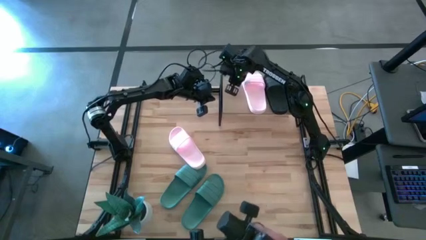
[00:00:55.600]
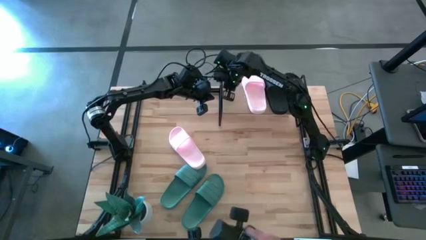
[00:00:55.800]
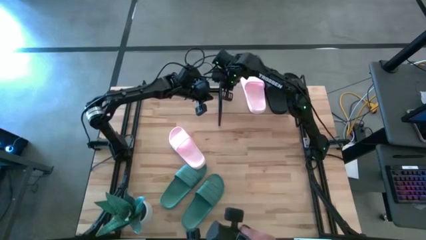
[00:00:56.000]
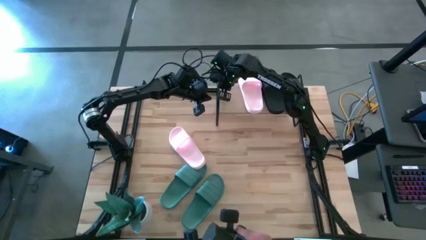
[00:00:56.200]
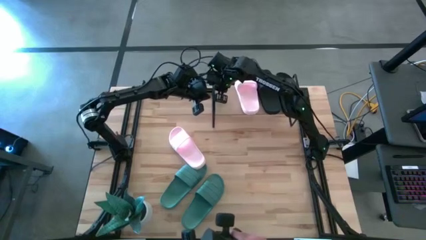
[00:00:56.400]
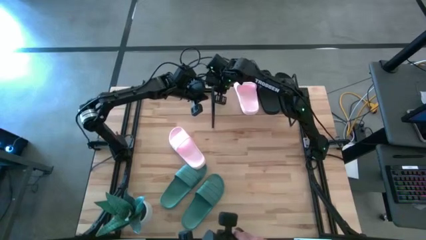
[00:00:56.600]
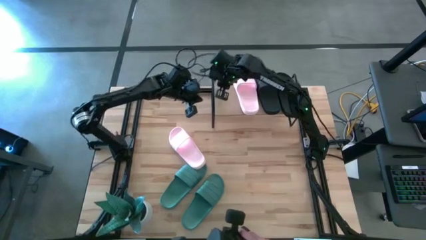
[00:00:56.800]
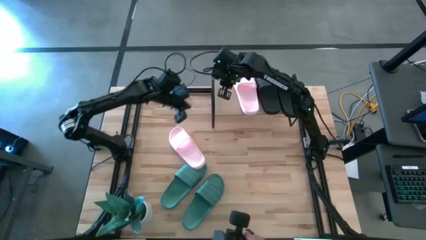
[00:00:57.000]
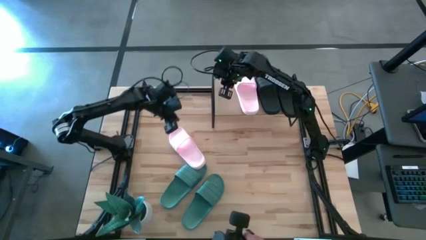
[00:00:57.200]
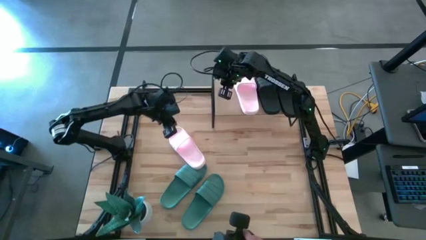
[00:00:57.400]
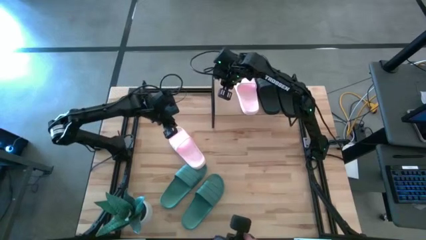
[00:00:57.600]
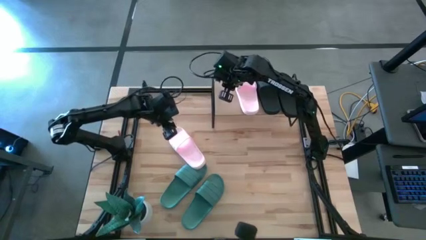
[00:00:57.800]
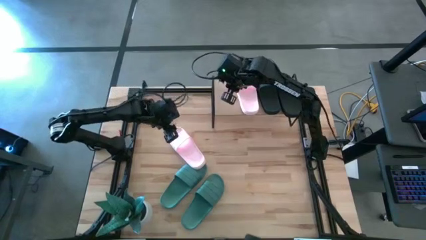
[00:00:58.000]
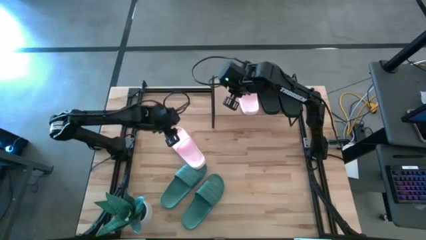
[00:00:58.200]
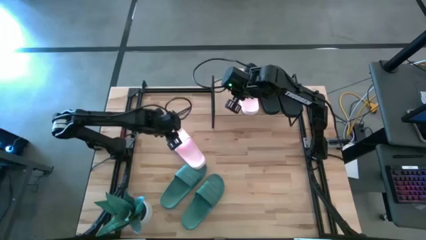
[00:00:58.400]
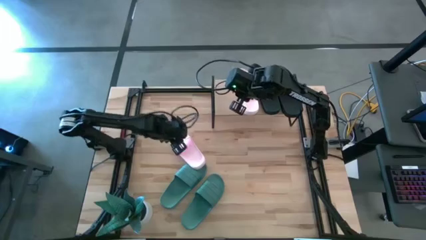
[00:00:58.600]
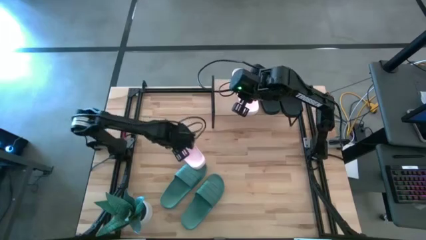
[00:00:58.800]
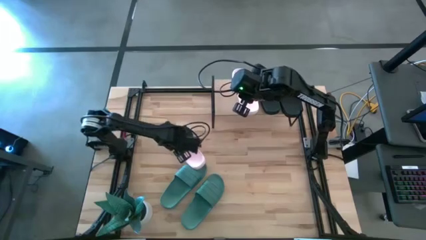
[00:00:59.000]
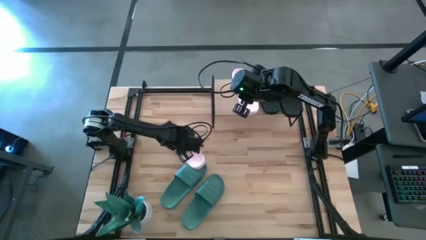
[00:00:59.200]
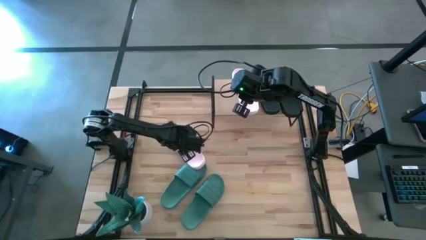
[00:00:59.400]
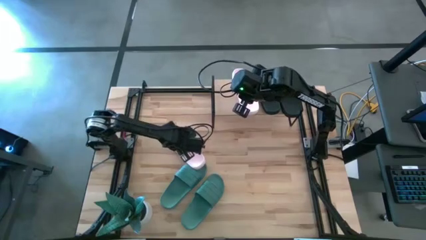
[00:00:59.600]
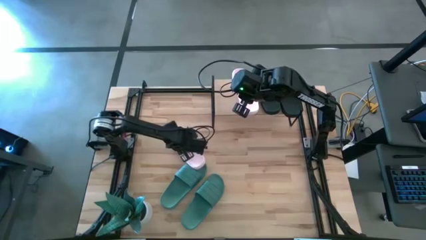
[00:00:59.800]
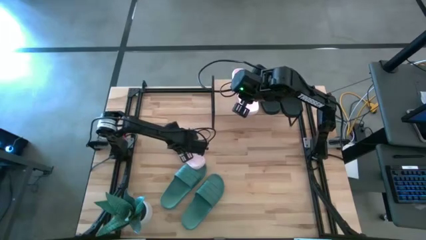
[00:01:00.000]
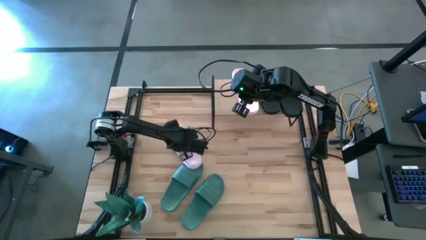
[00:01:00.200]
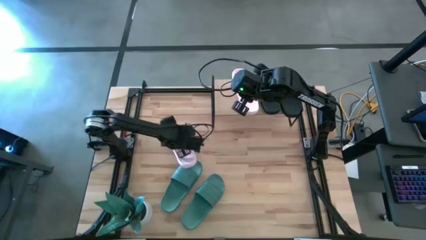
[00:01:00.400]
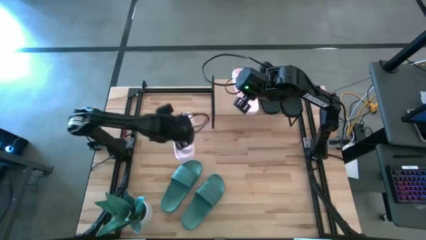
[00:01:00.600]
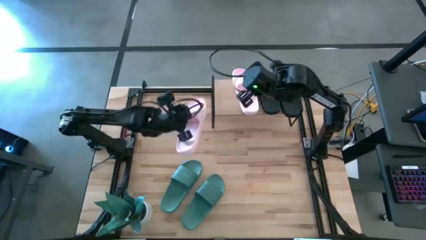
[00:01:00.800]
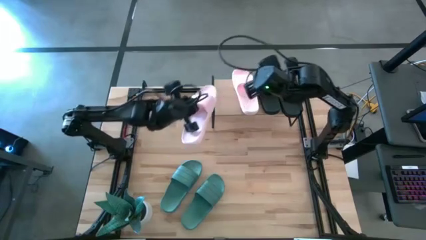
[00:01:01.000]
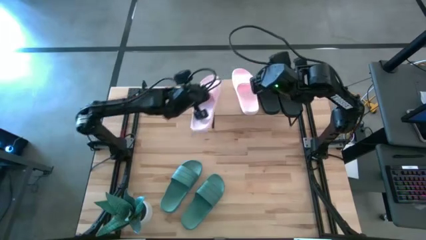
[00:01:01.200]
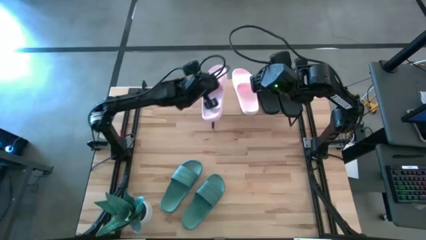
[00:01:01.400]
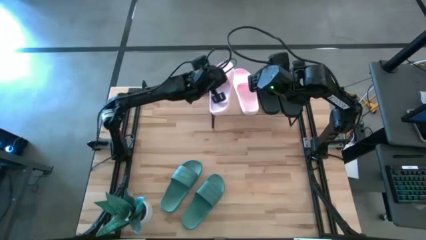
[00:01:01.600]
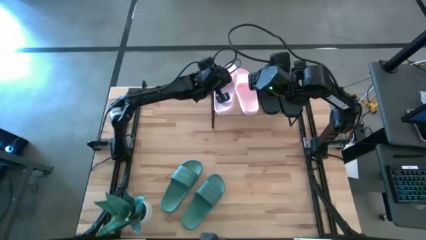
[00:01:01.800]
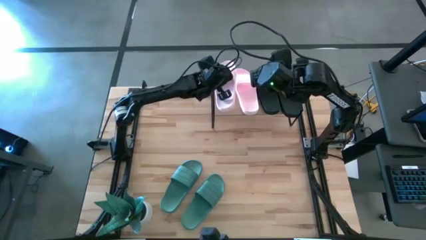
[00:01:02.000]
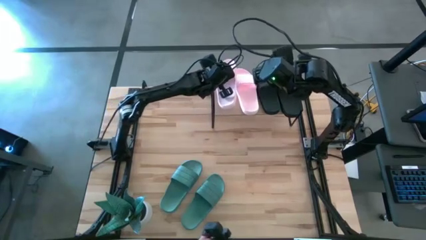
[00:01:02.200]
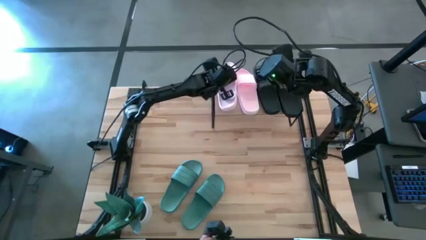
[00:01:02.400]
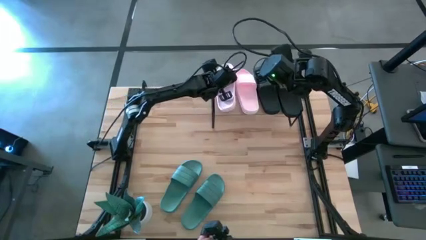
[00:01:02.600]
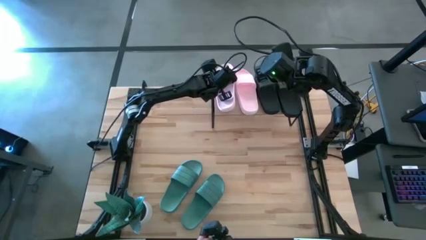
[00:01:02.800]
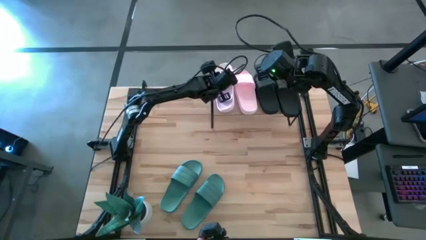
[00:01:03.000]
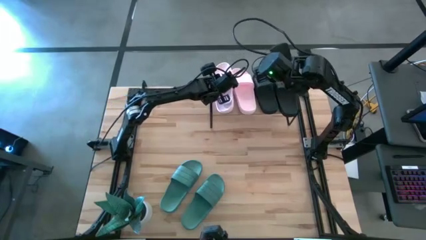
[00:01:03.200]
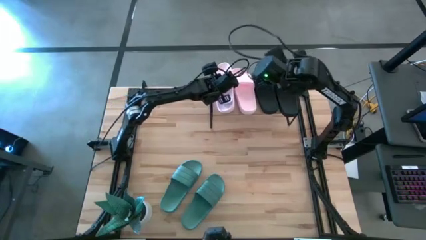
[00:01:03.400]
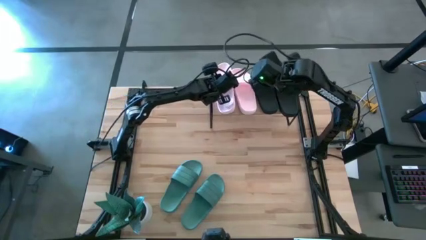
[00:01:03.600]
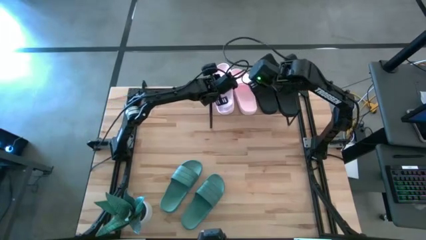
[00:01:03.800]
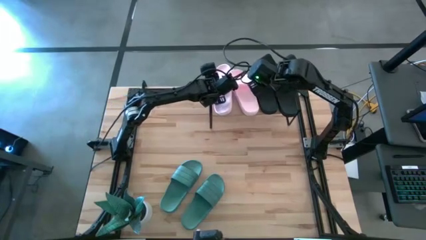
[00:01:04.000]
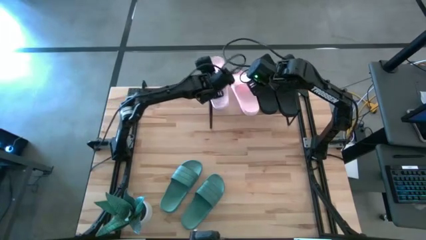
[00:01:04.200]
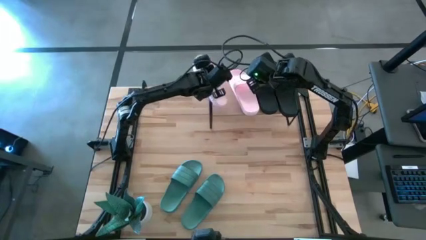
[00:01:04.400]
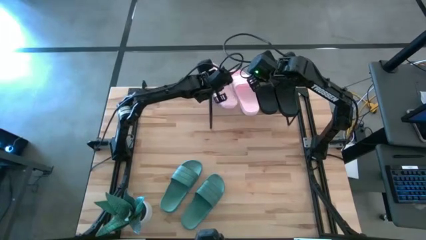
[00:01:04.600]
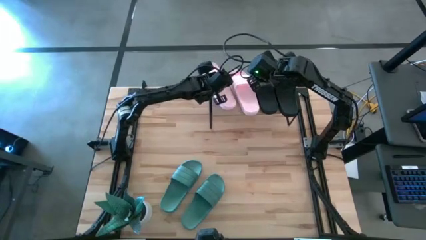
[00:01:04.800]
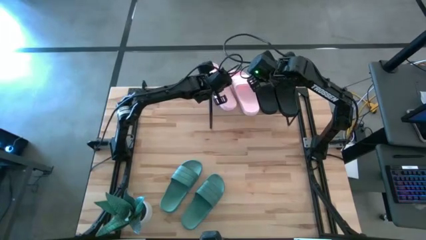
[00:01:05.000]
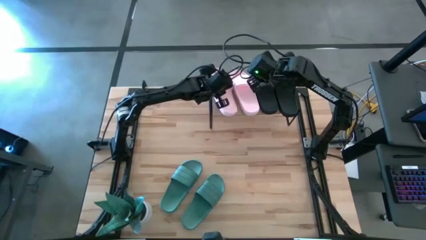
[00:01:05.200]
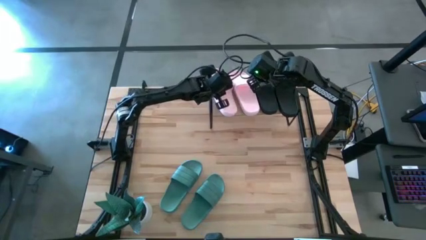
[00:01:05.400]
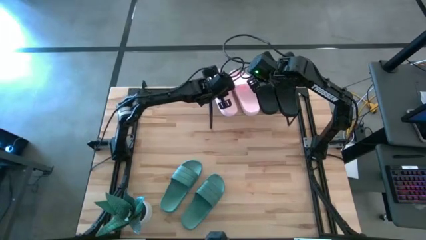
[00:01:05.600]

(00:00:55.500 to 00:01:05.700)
Task: Pick and place slides into the shelf
Put the pink slipper onto the shelf
